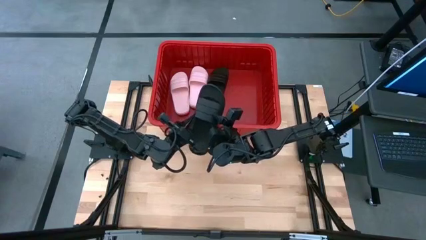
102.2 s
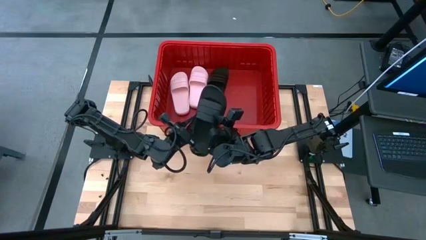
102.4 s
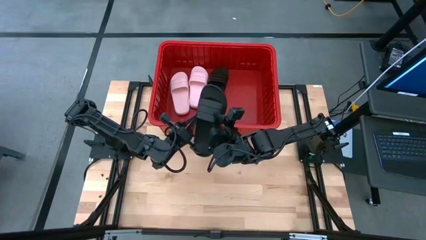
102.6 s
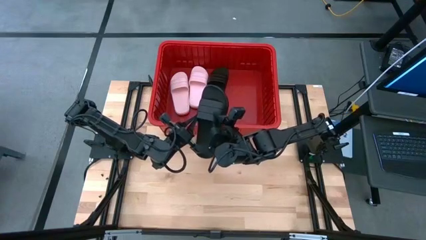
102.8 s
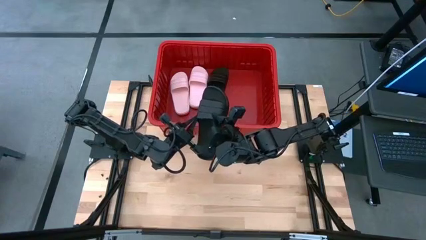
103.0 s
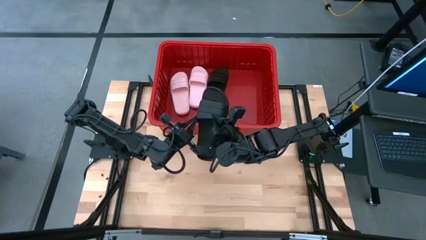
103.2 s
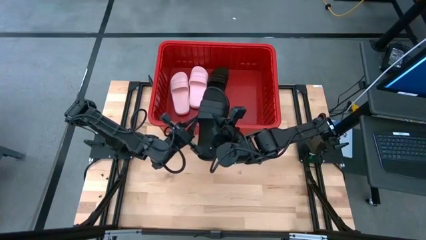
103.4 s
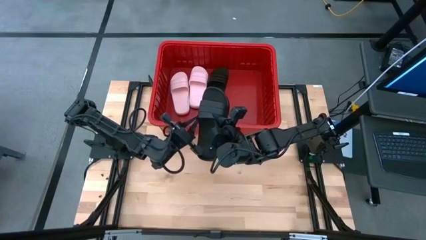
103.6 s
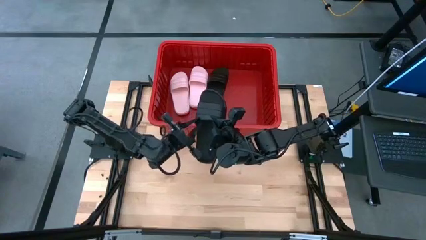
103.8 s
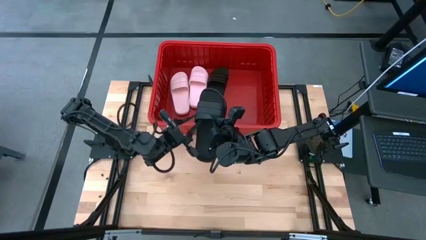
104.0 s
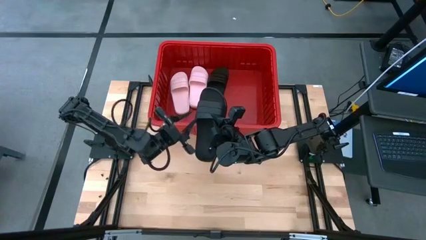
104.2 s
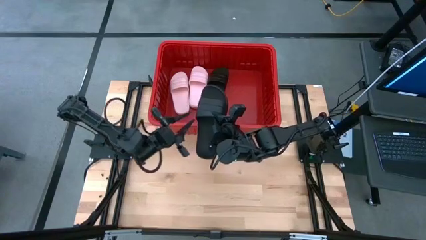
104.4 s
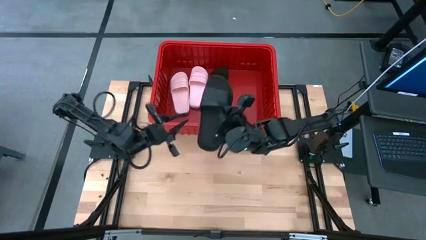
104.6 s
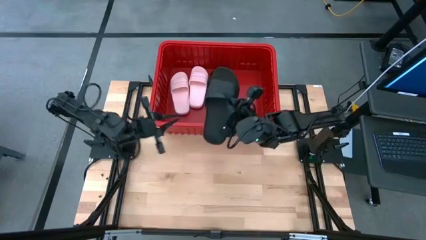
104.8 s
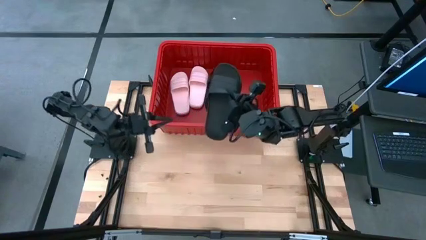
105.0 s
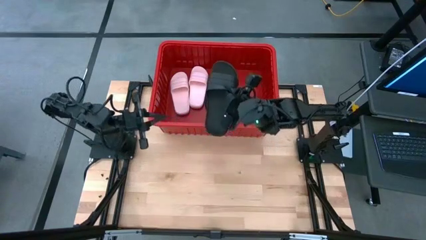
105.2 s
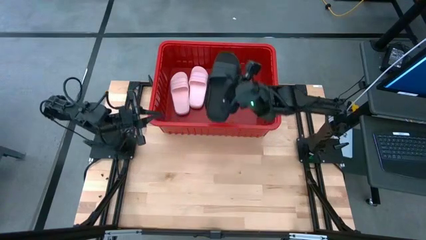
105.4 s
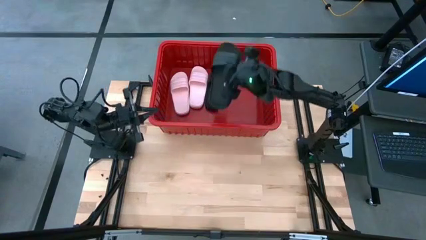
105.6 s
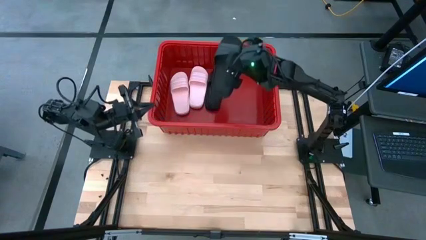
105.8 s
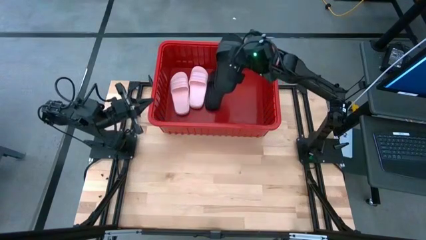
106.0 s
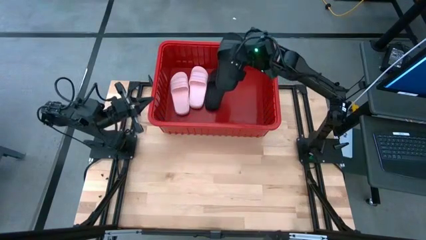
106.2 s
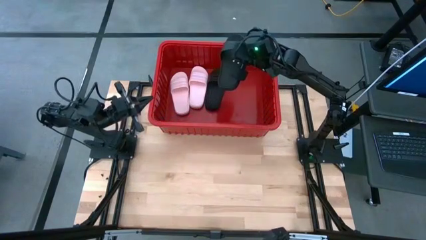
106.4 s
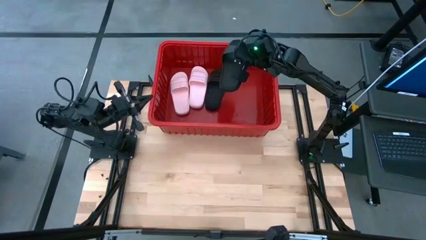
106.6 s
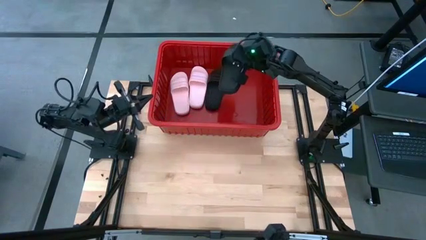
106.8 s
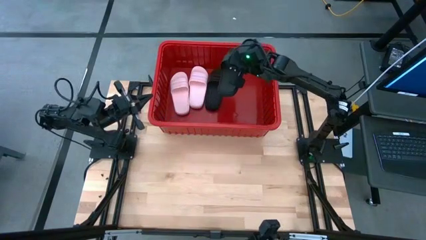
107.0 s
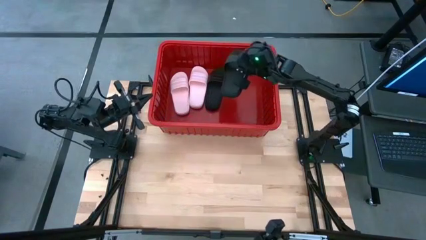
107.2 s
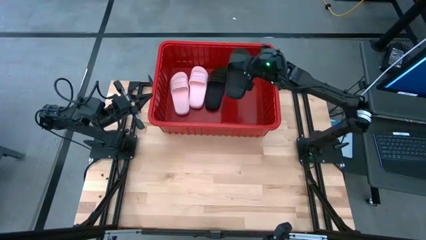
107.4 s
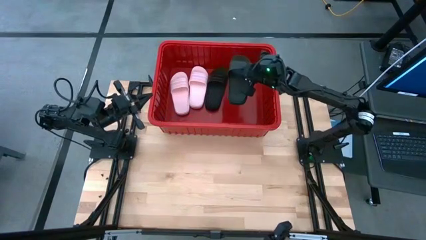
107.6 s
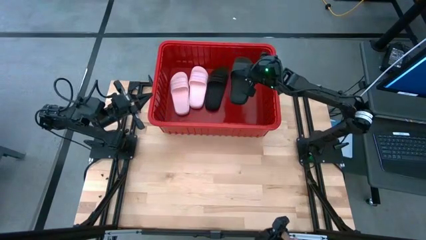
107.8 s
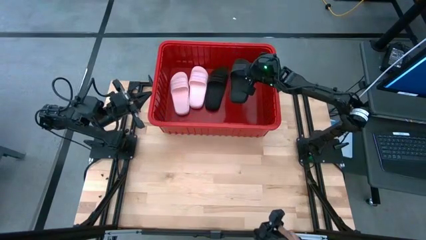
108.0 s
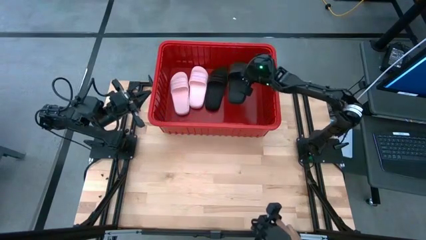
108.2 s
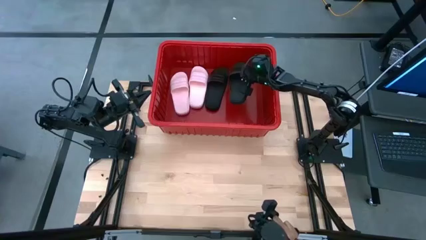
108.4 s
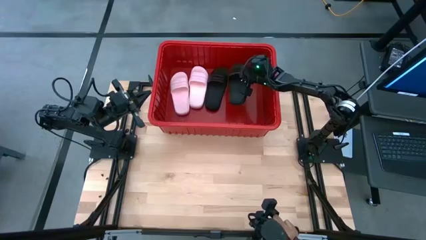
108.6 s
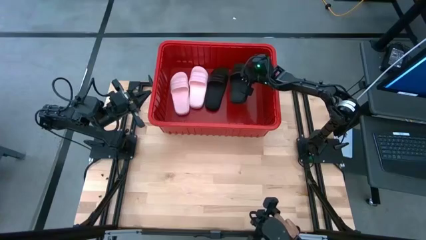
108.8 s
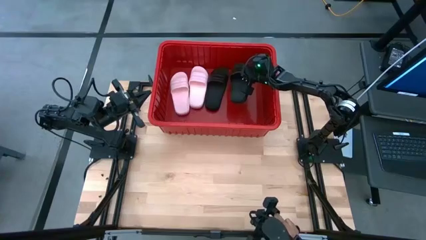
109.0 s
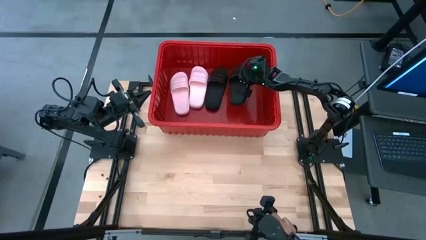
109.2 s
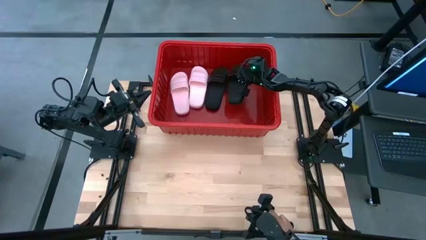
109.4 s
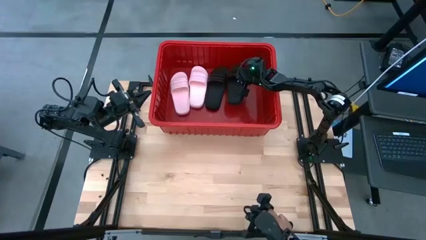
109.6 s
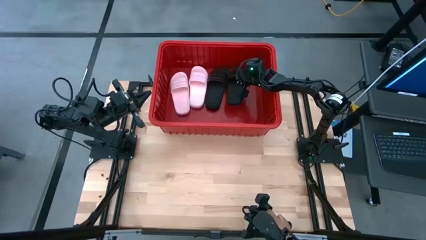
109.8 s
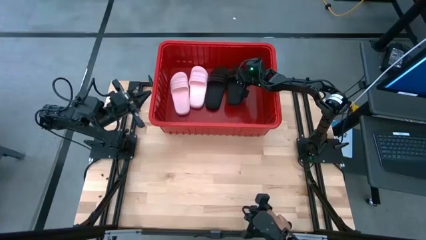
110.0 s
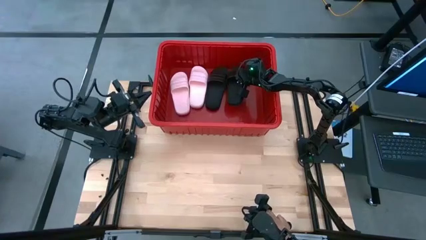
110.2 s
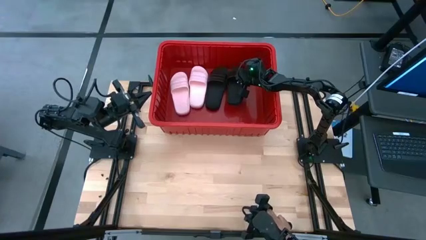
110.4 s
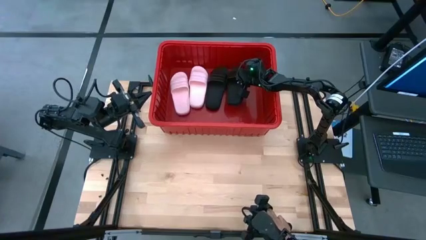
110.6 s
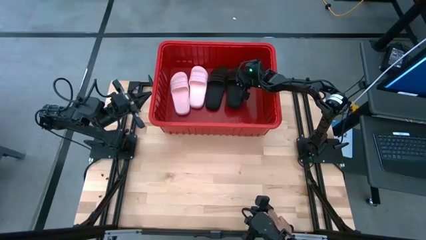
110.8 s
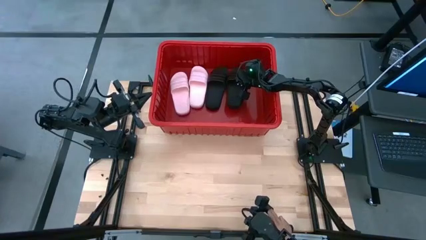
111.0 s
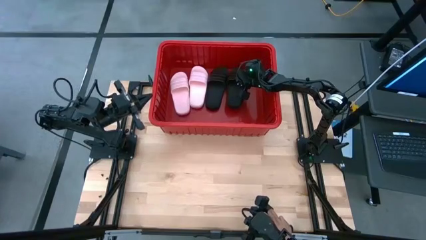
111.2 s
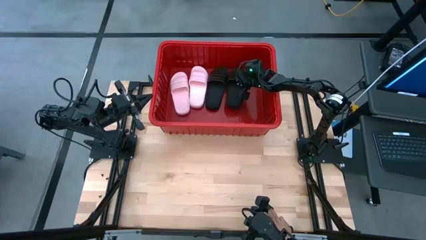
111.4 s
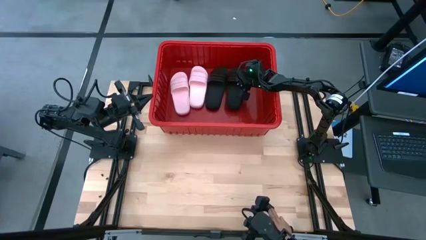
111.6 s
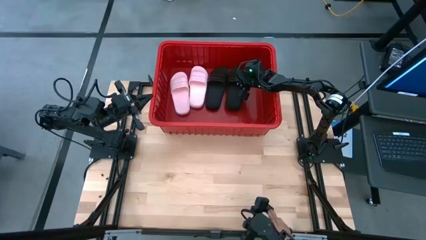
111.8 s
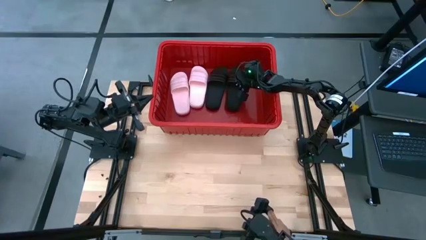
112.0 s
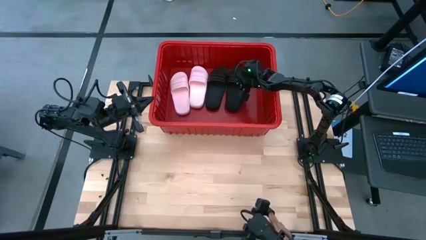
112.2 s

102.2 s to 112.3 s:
Task: Pick and place slides into bin
Put the black slide into the red bin

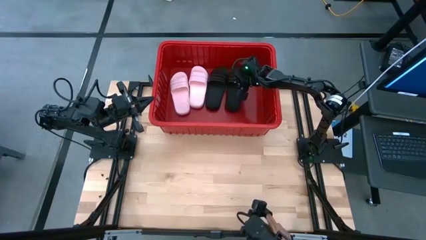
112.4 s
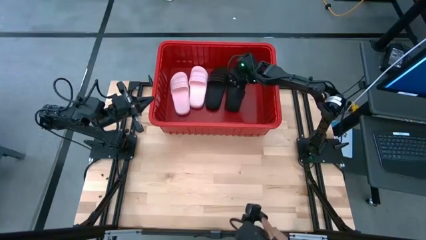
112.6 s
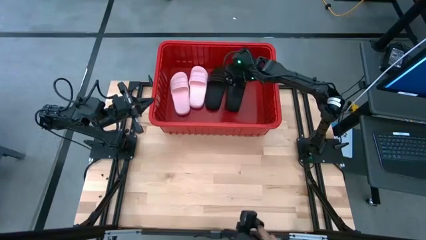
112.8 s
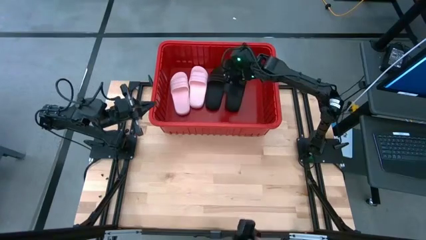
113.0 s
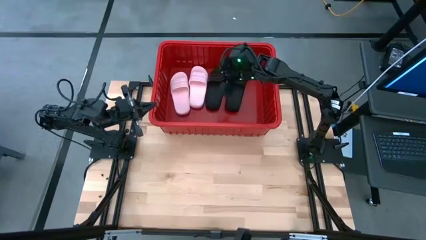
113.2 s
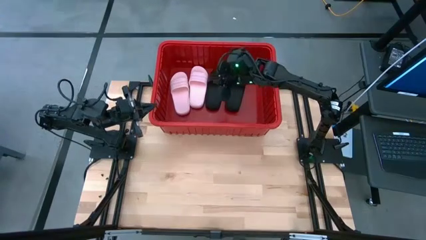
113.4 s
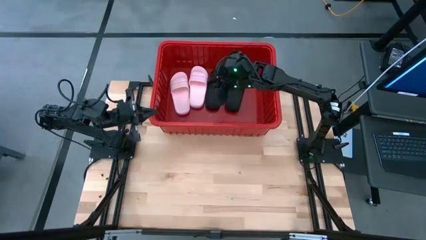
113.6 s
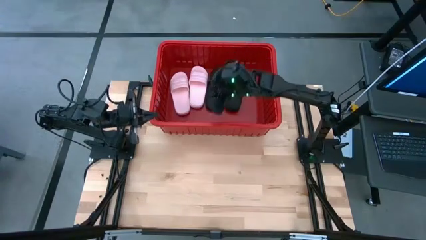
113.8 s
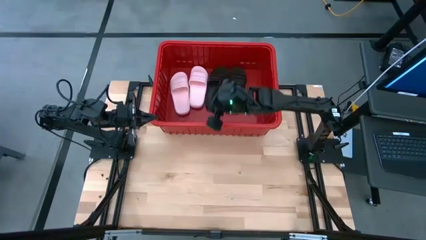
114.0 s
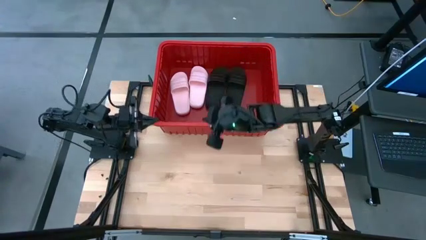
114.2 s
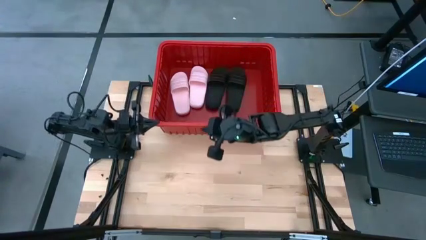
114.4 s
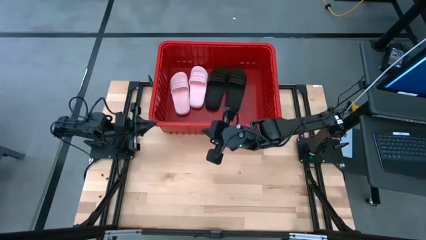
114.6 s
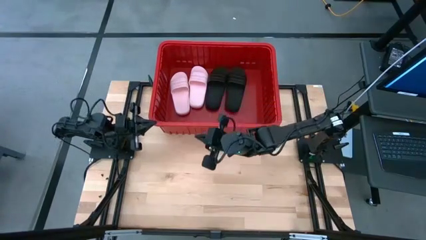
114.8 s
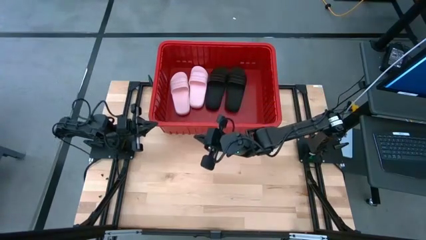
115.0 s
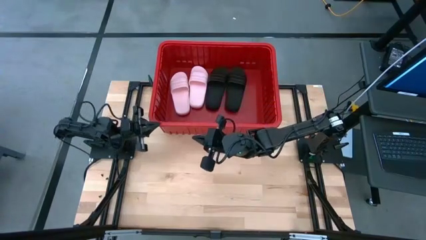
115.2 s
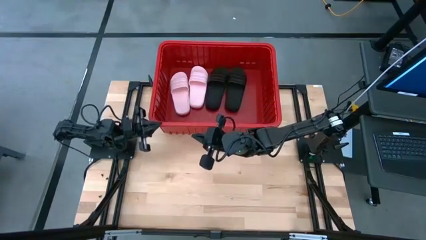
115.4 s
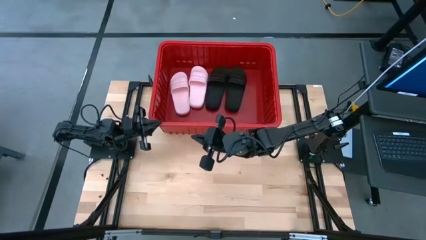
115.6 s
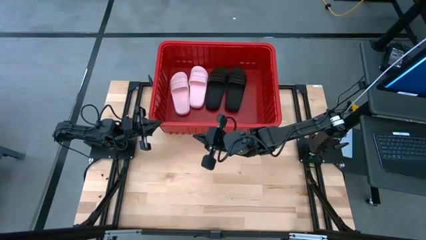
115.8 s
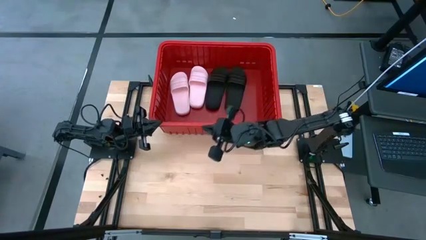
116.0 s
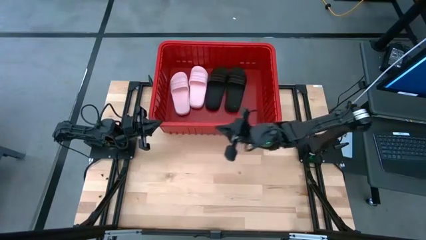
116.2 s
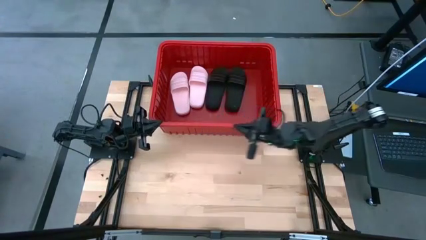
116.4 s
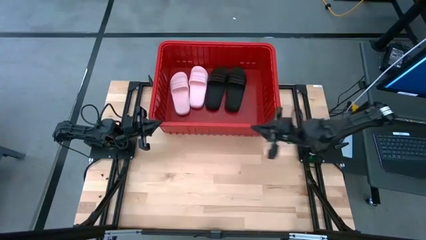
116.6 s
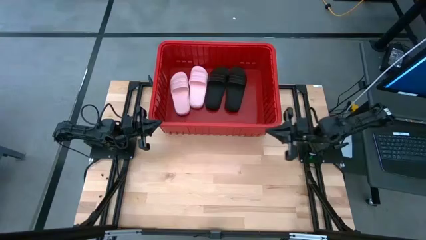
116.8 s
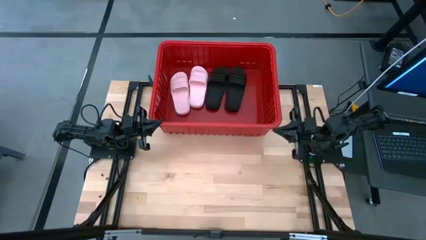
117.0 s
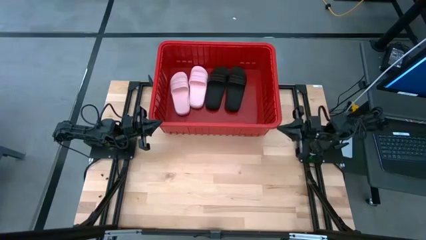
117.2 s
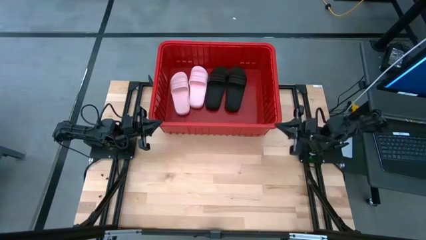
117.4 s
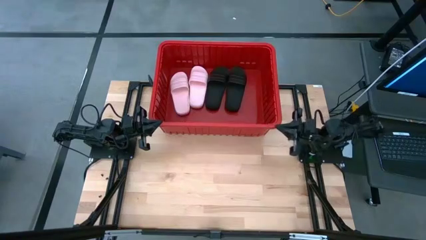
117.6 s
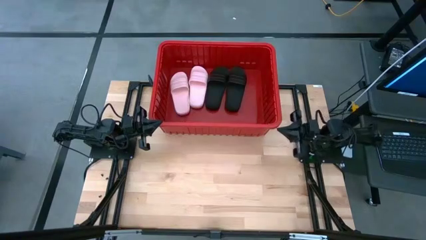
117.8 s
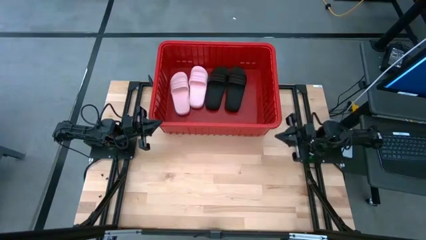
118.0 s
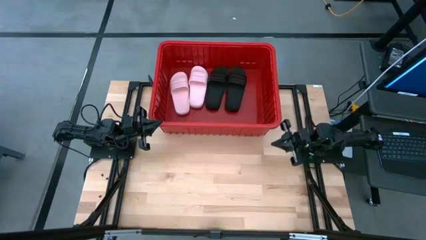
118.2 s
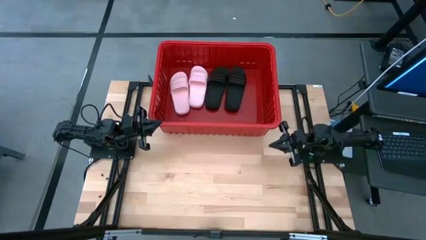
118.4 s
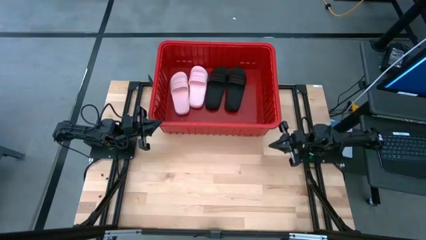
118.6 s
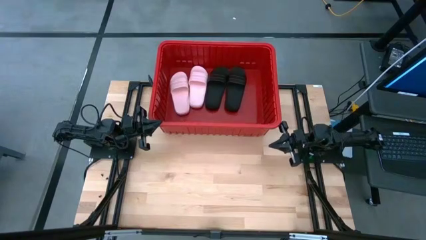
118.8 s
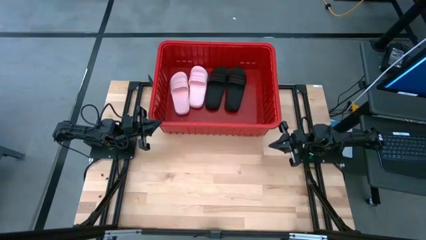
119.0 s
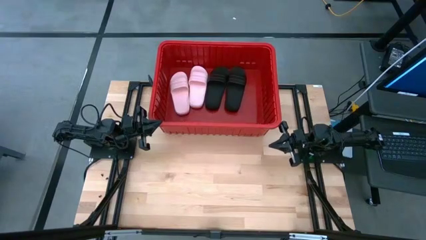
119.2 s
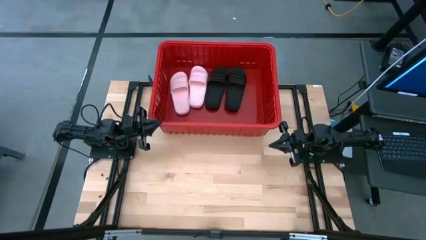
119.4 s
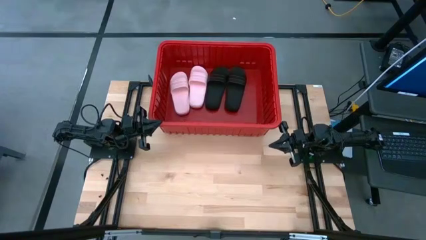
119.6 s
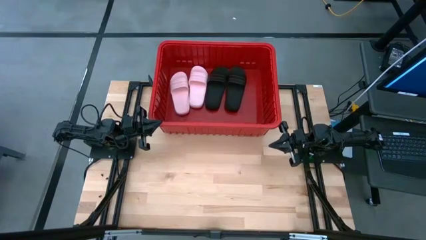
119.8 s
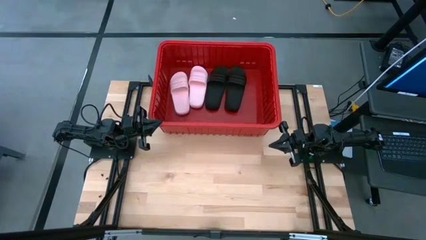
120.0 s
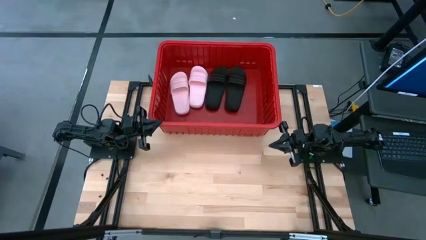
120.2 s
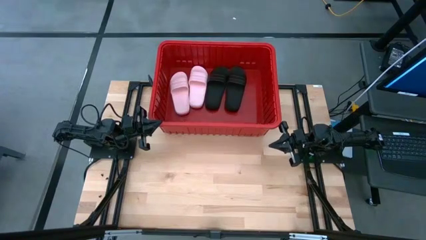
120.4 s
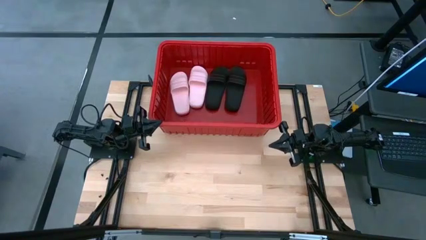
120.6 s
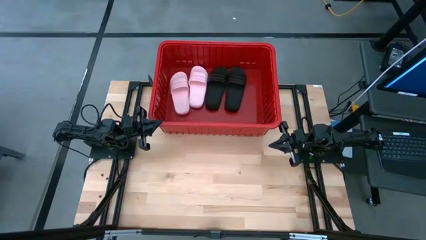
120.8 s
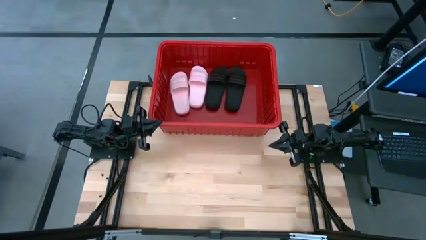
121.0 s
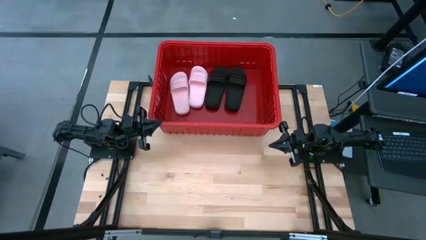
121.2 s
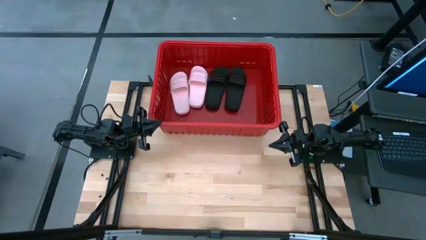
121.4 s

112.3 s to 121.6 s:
Return to Home Position
